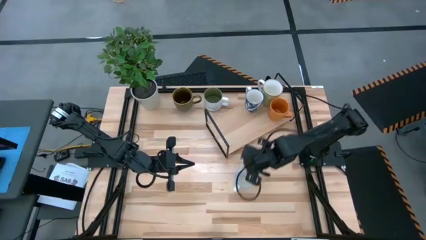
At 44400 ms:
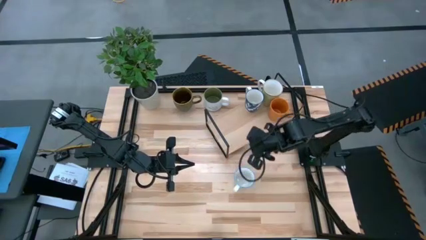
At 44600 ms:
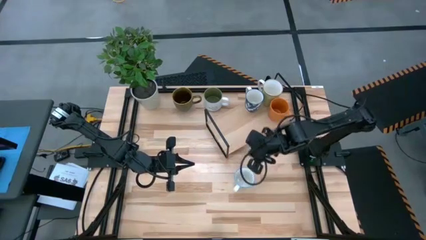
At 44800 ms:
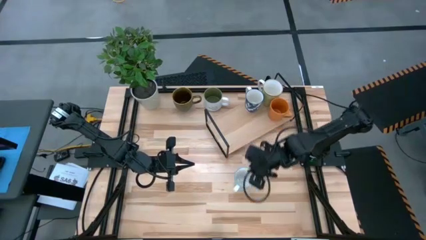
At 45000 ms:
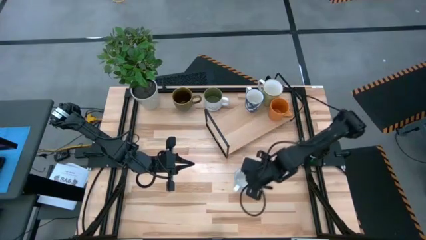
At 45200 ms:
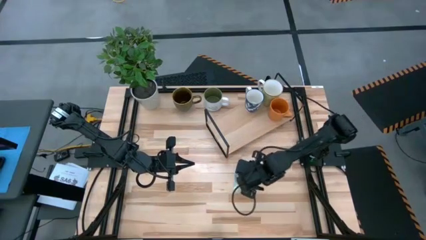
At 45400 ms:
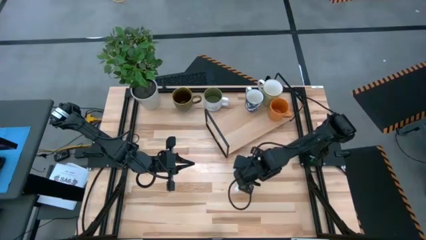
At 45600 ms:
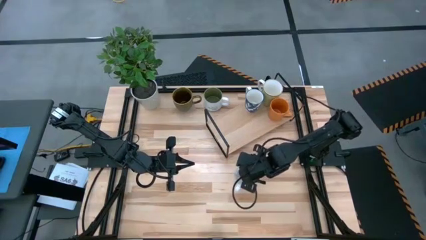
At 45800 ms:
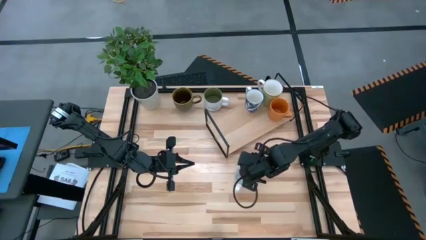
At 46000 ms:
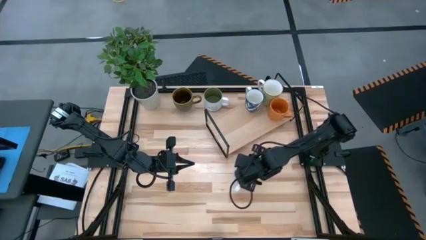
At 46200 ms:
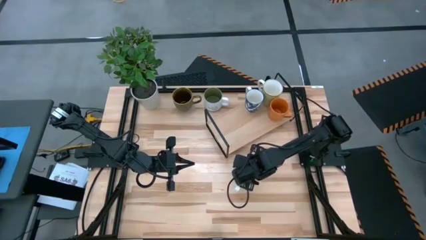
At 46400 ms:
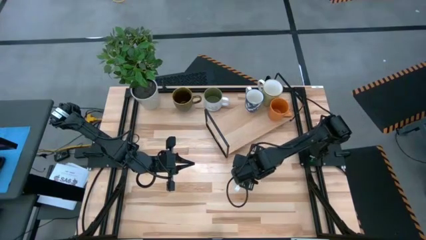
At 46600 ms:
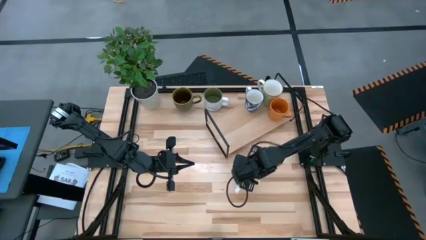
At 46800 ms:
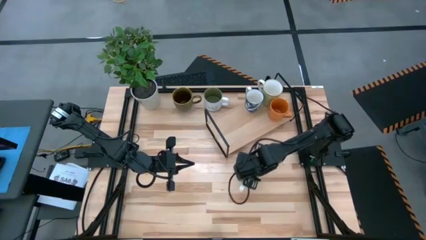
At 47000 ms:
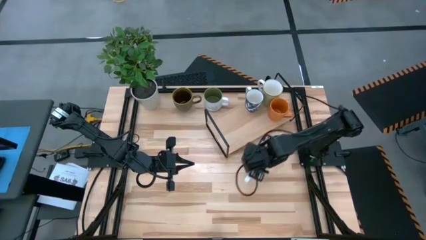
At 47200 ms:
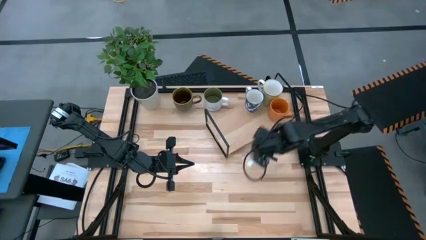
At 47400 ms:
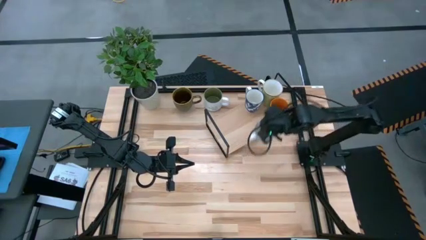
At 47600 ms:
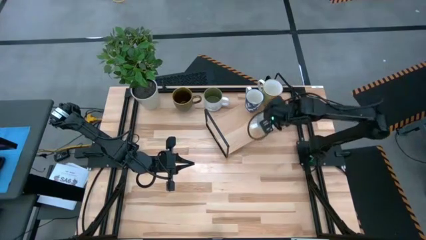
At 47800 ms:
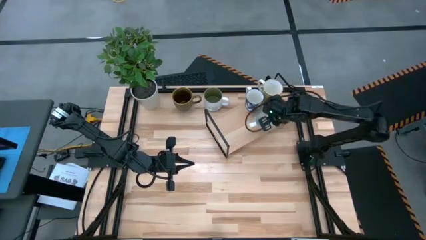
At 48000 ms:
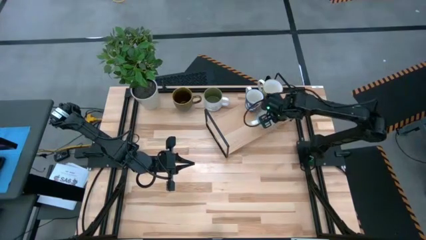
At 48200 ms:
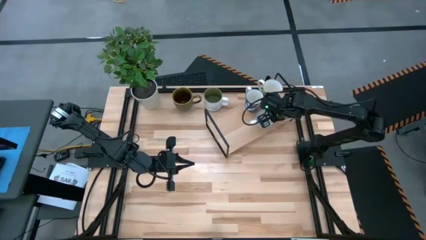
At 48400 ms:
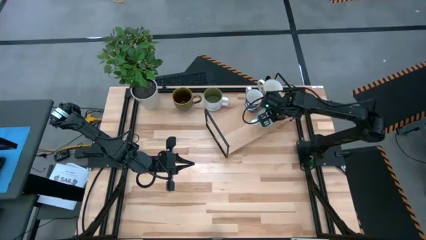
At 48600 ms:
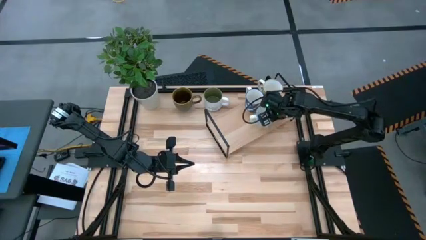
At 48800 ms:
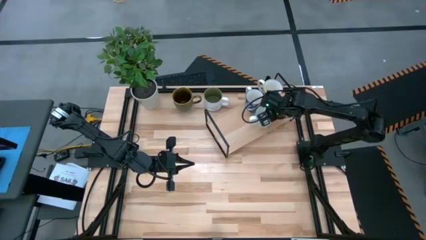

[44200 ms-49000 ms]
Task: Place coffee mugs
Put the green patterned mug on the shelf

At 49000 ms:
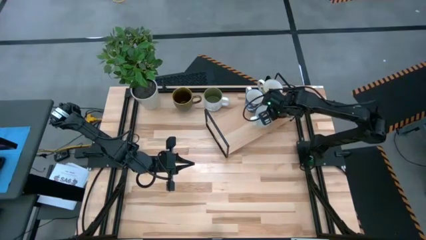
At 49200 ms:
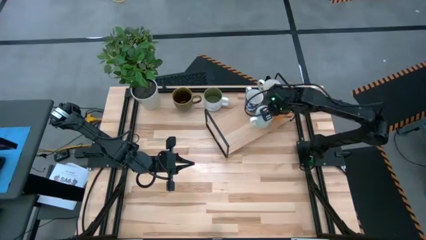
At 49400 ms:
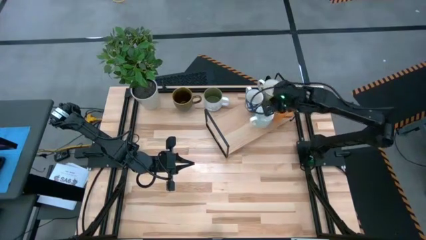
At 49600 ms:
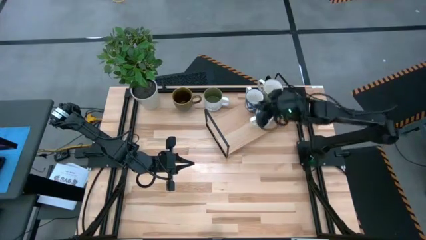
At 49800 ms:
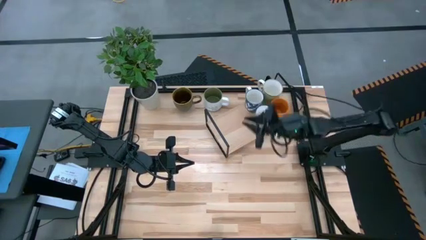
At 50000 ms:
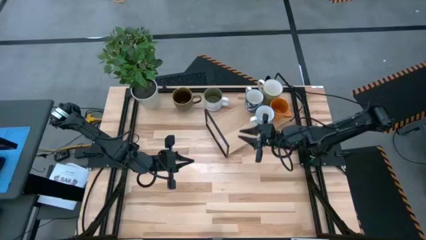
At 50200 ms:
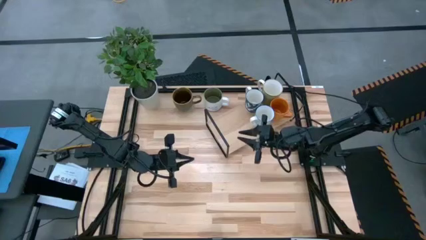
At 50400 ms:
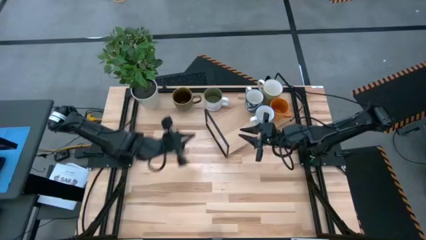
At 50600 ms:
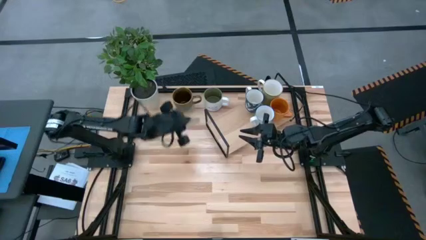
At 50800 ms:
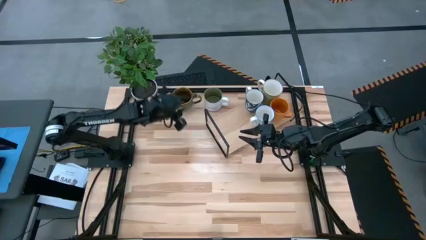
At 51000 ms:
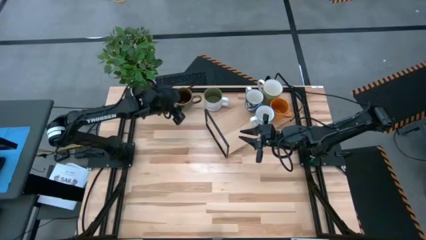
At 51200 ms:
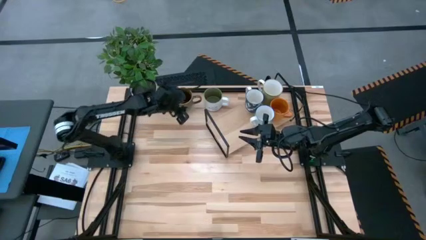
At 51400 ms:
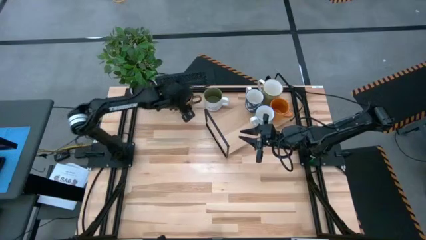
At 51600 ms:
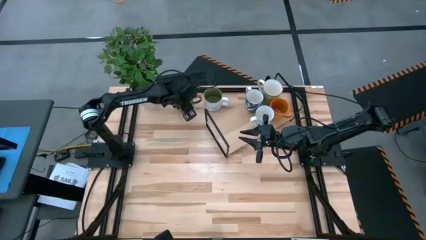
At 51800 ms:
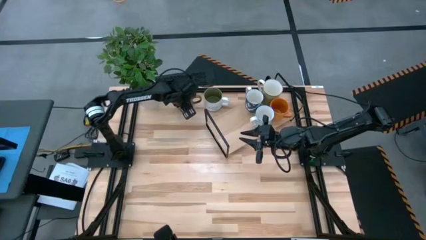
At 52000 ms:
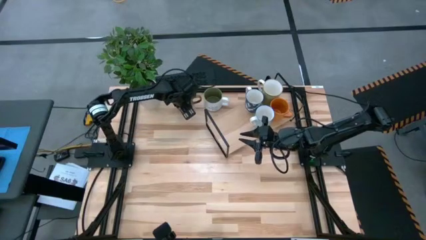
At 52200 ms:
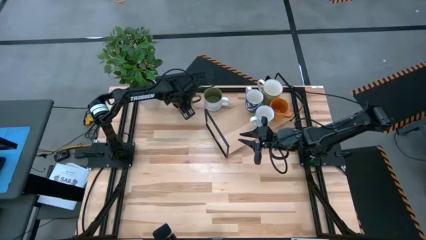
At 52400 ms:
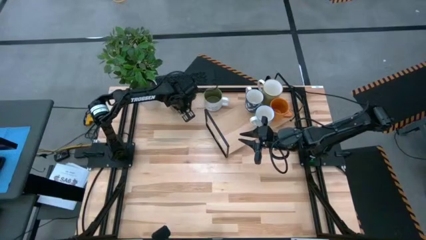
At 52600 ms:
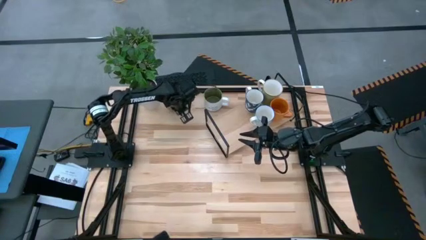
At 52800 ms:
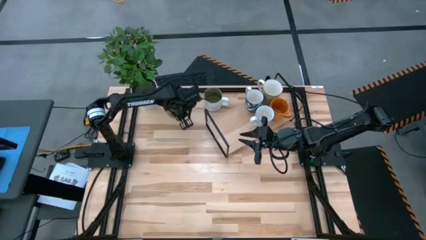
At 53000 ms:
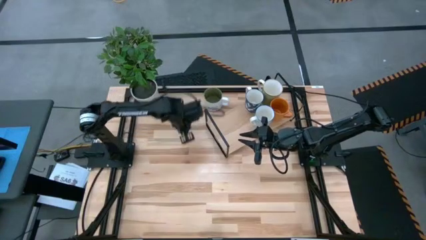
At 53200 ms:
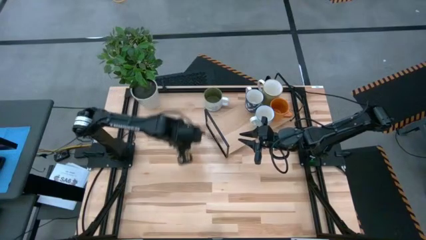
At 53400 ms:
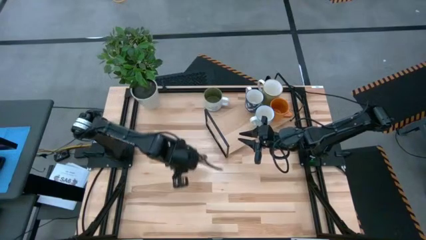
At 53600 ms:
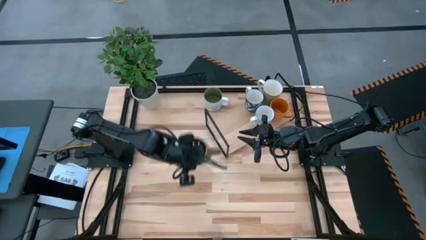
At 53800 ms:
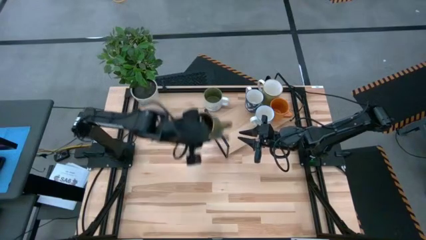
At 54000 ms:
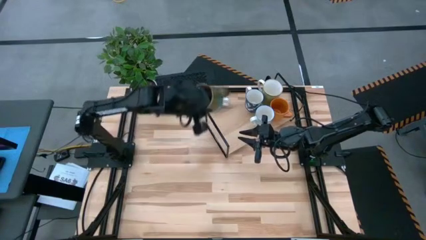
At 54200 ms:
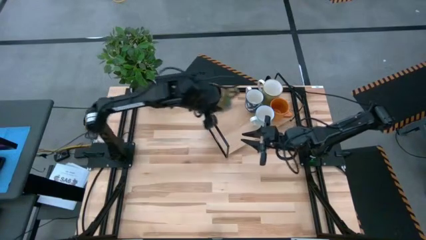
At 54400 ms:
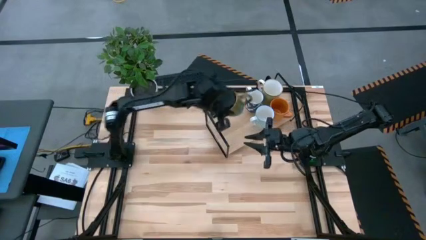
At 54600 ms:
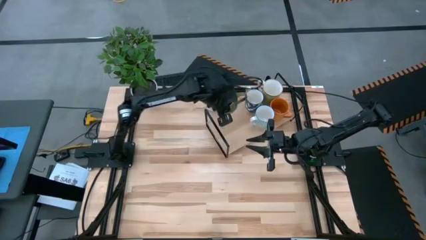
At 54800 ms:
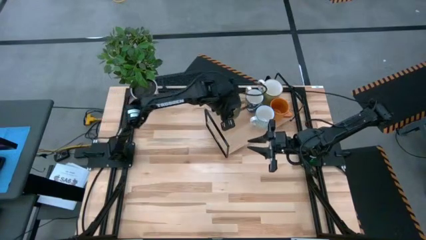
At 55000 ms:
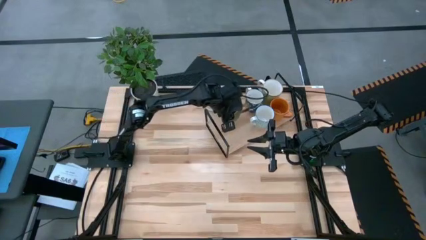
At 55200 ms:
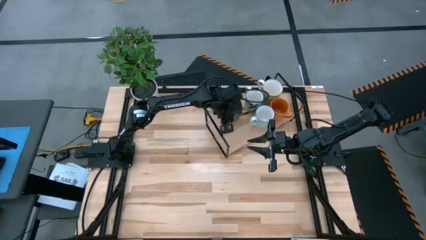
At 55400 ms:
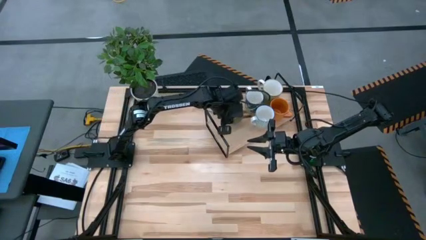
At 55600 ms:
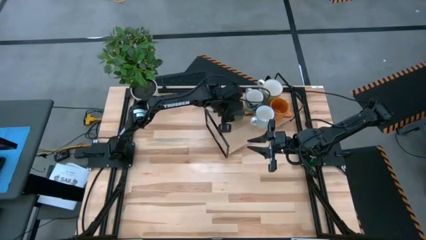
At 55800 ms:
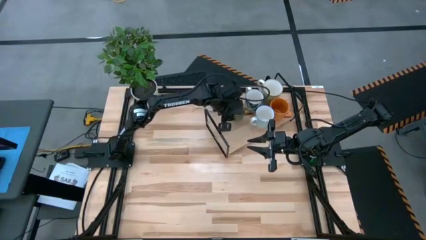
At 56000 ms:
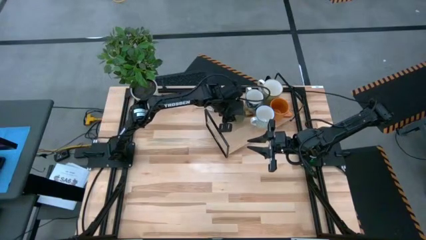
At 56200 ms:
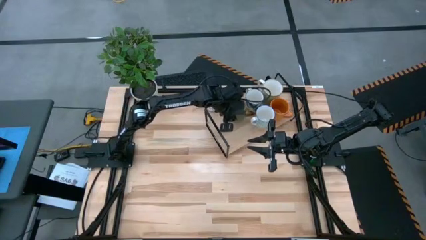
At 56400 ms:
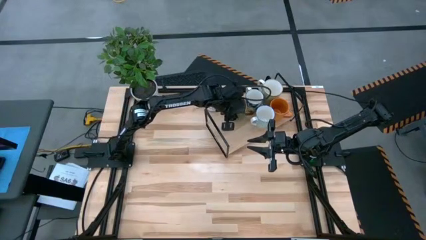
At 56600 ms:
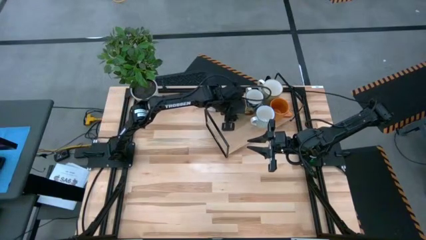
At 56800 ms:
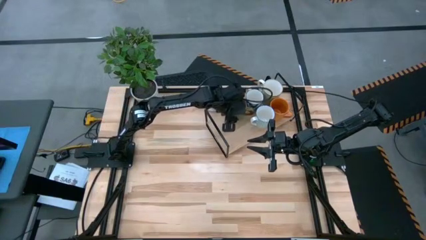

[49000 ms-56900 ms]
Put the brown mug on the shelf
